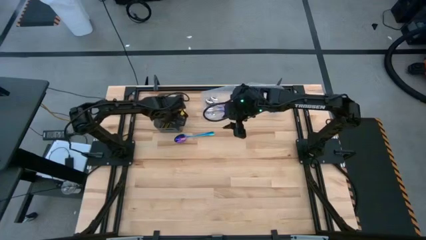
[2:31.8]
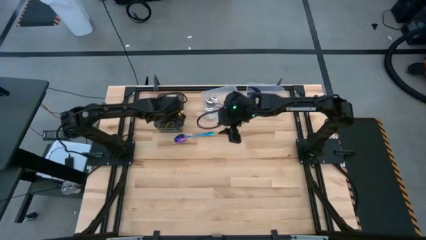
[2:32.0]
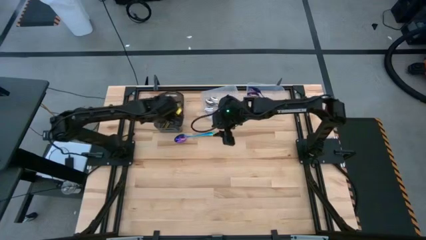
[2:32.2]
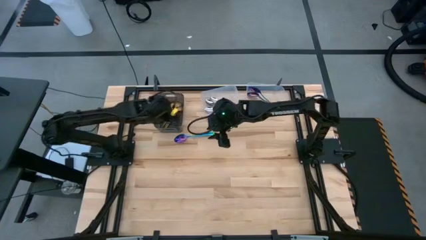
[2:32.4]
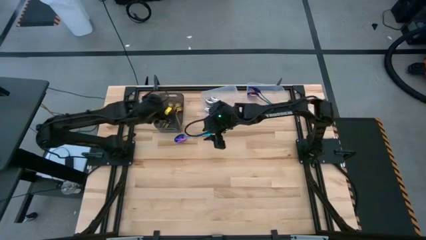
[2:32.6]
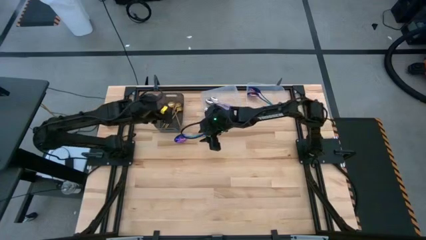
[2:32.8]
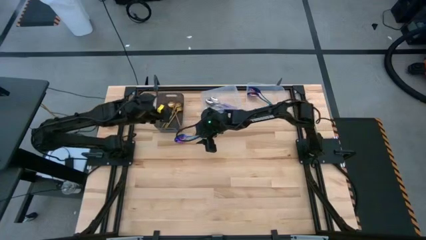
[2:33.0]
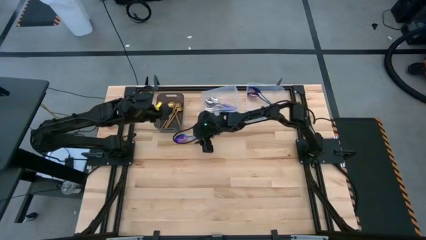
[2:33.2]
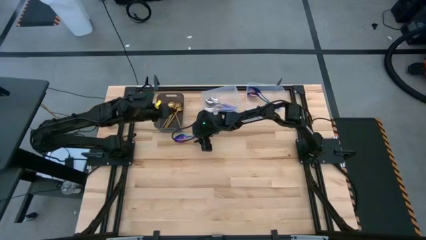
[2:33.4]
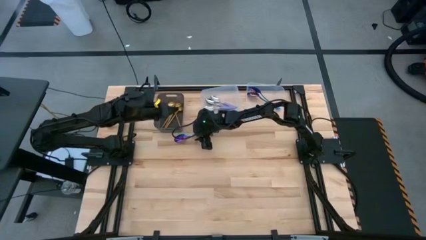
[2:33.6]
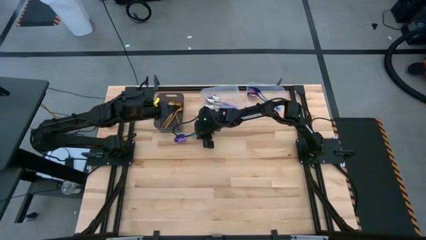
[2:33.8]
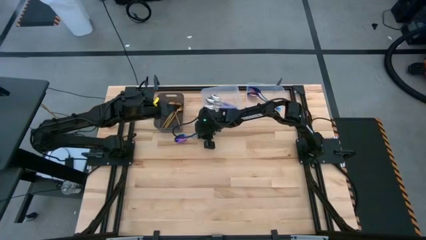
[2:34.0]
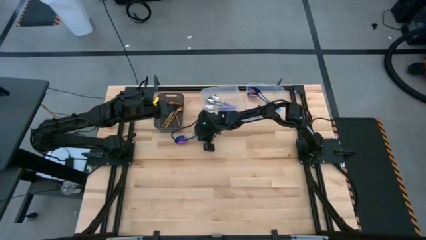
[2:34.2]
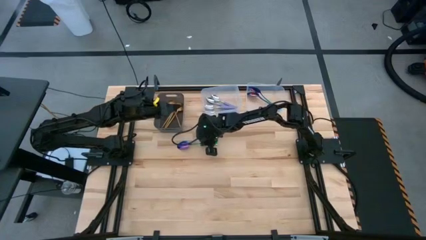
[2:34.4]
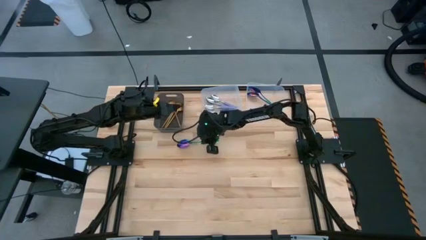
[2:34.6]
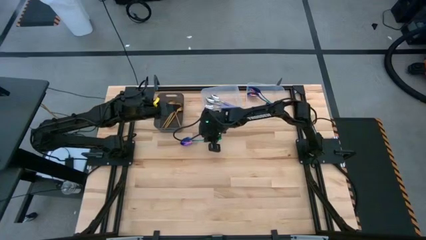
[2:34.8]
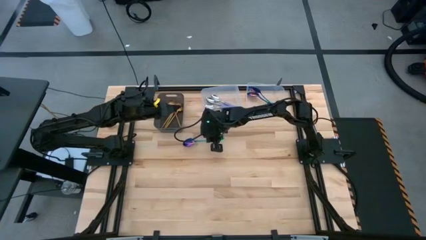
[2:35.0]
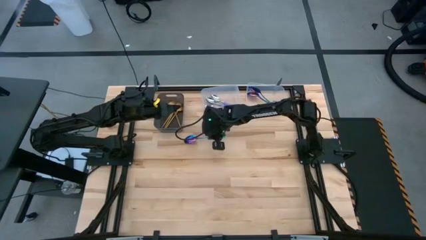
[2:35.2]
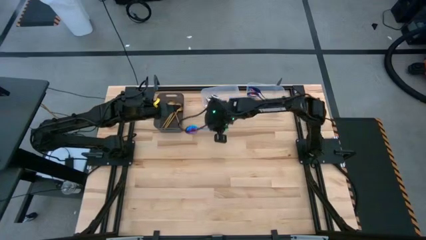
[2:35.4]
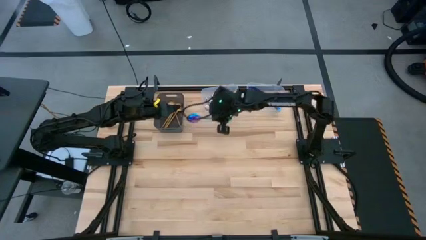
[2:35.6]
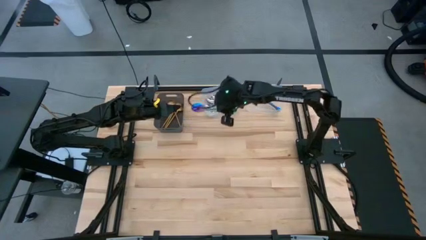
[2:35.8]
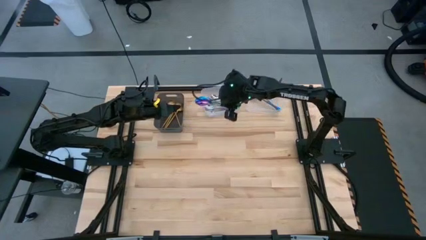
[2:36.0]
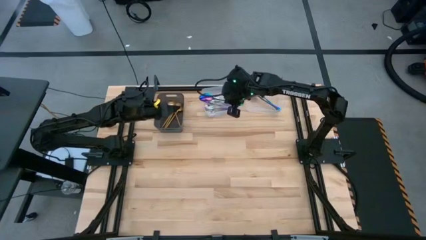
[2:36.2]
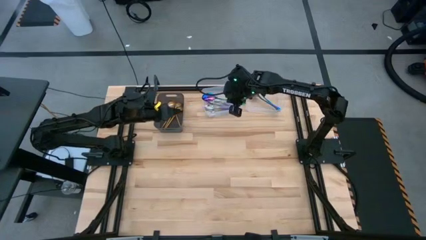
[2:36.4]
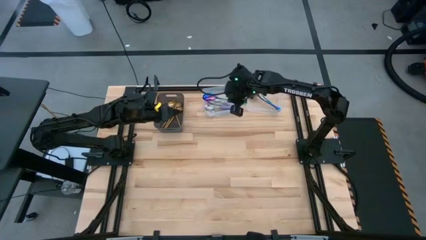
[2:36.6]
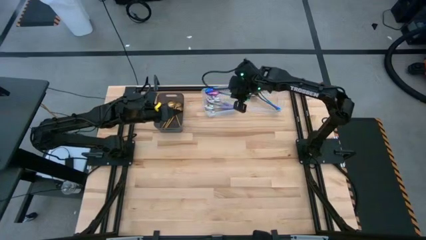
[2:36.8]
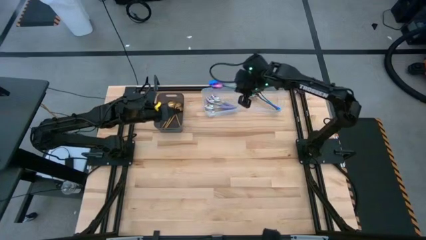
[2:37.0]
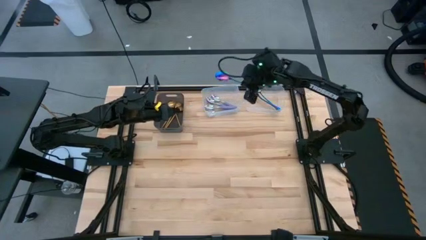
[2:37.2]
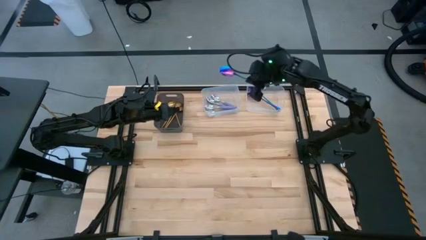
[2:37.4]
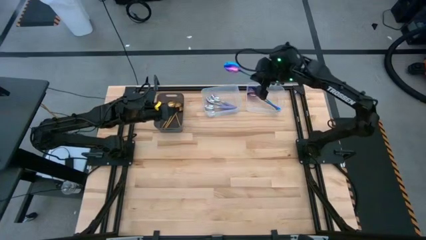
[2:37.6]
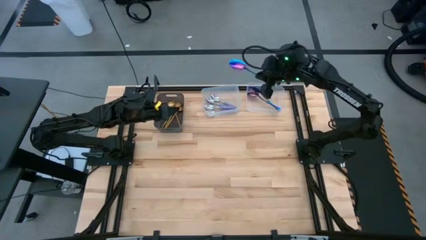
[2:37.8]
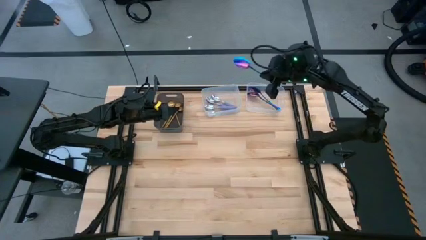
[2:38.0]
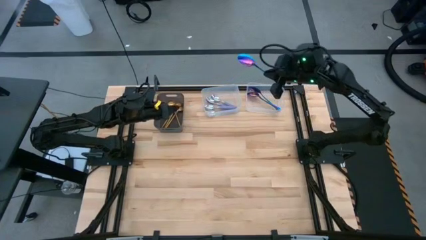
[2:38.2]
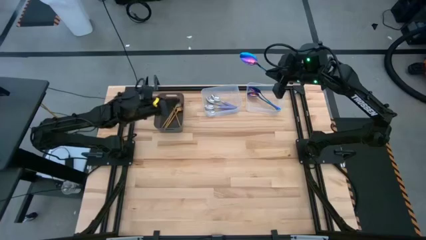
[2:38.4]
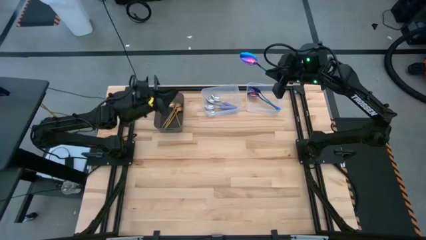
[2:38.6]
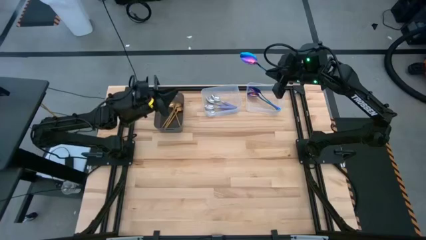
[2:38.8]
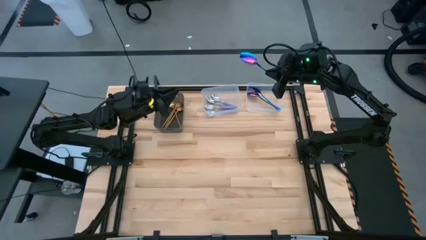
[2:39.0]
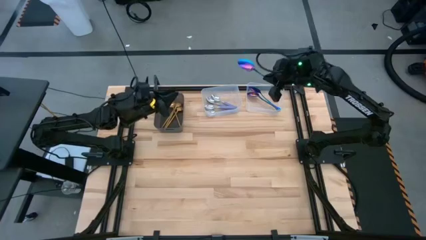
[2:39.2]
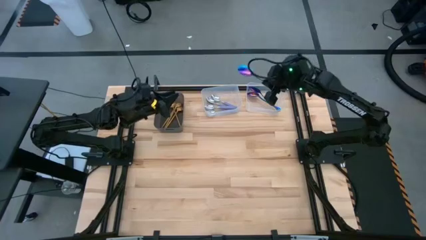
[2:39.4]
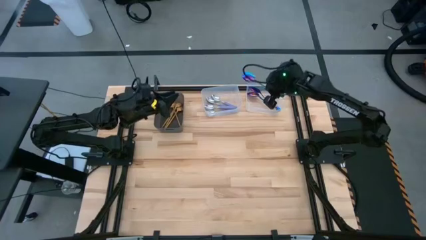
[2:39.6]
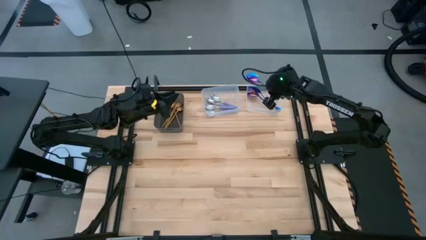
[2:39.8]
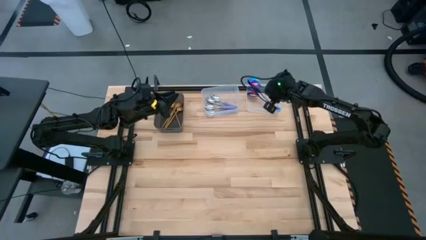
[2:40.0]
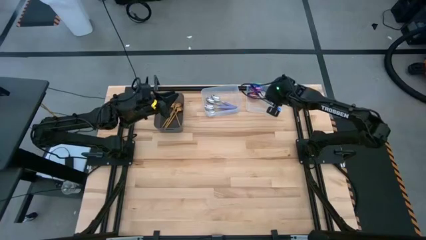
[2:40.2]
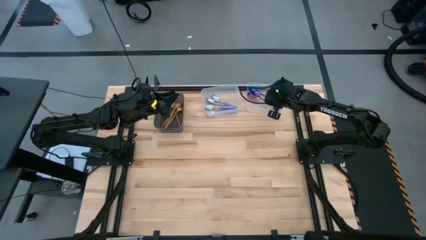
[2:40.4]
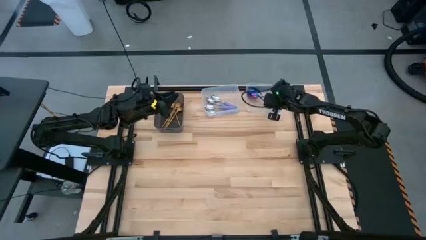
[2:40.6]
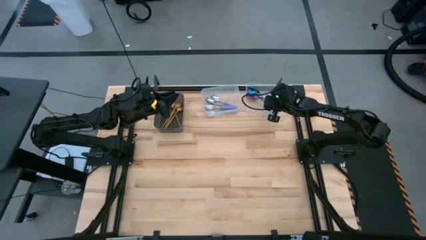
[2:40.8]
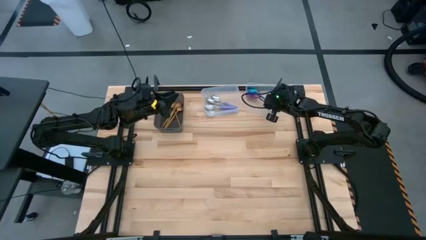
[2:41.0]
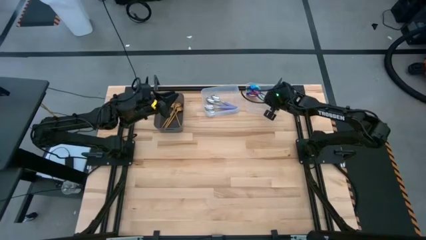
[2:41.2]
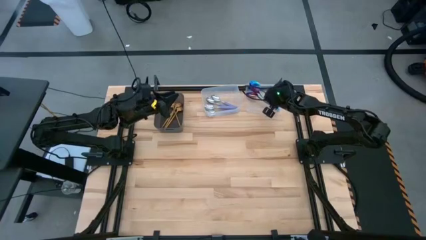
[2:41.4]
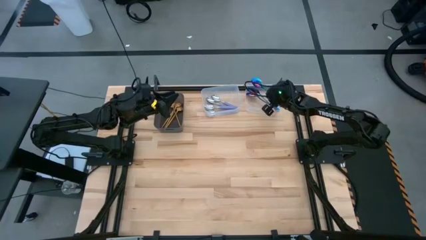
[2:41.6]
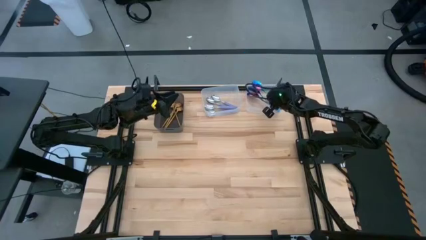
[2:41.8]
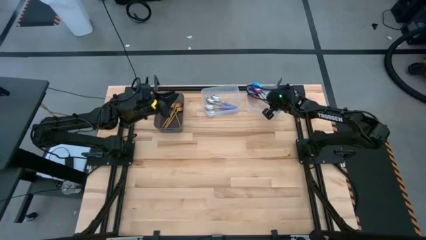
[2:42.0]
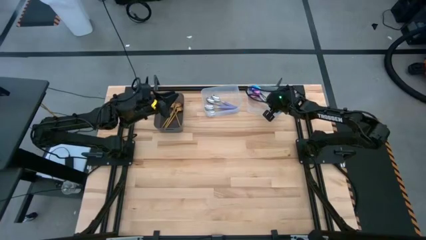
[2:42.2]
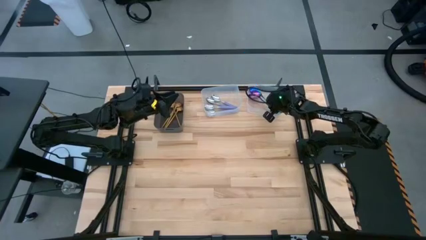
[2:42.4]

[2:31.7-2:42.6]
Task: Sort silverware by color (type)
Put the blue spoon into the right transparent bin

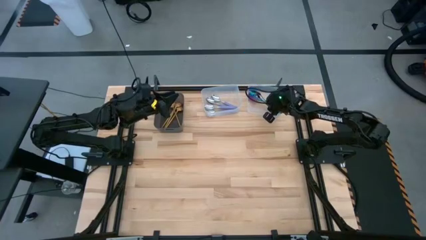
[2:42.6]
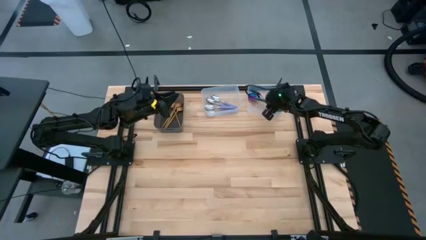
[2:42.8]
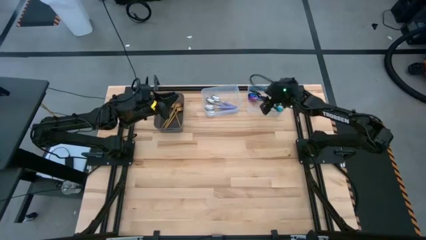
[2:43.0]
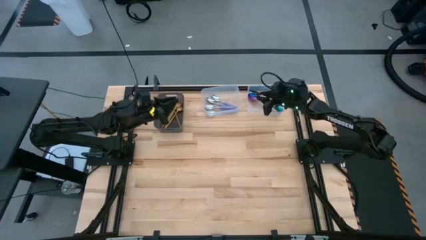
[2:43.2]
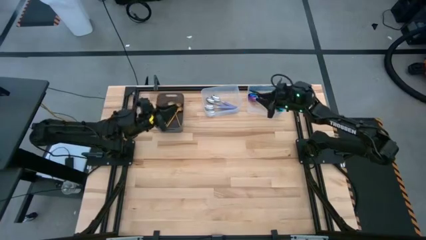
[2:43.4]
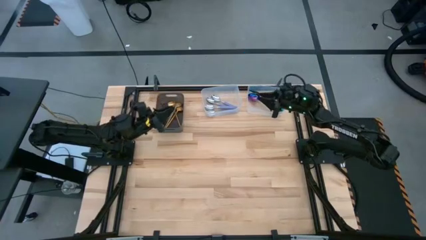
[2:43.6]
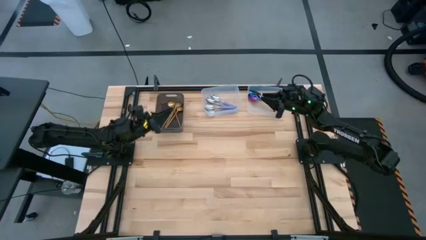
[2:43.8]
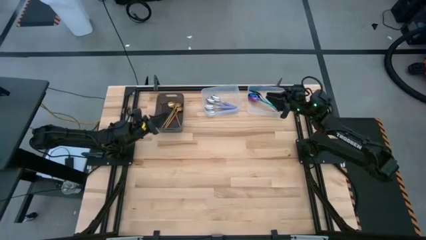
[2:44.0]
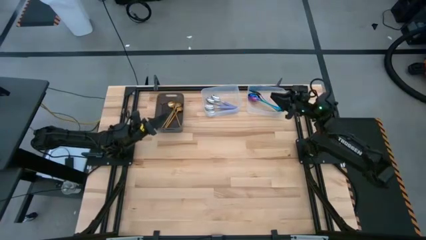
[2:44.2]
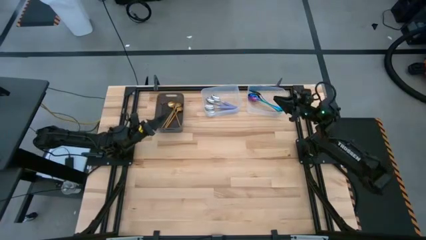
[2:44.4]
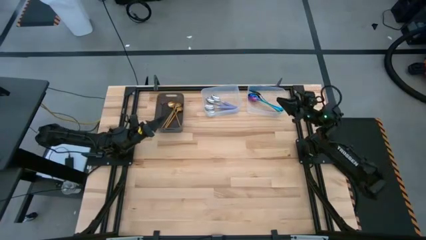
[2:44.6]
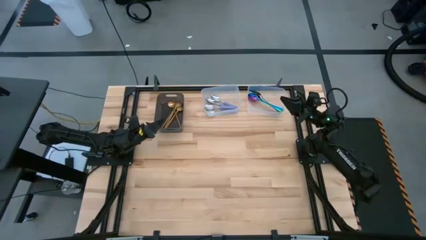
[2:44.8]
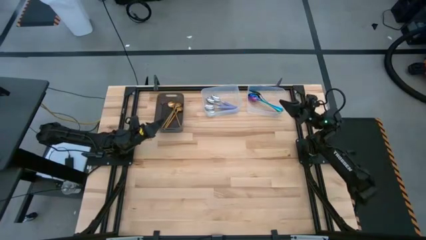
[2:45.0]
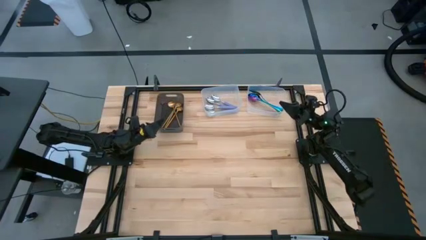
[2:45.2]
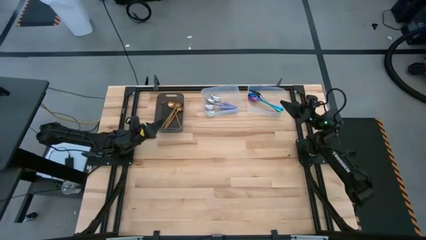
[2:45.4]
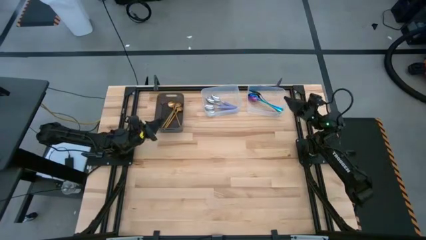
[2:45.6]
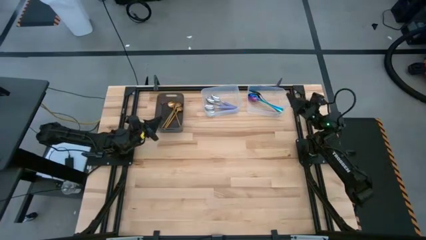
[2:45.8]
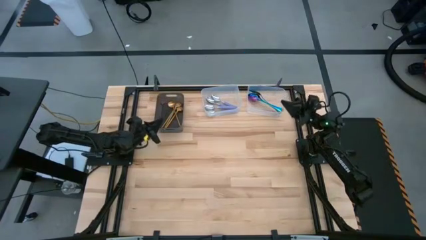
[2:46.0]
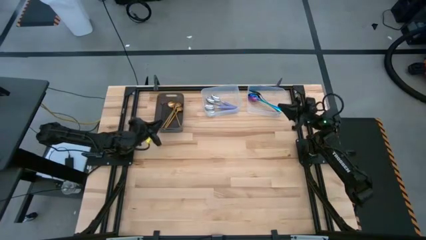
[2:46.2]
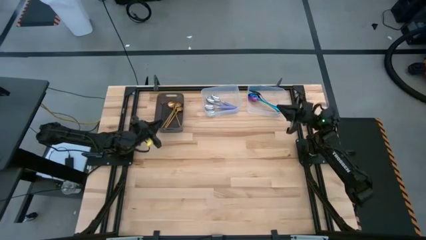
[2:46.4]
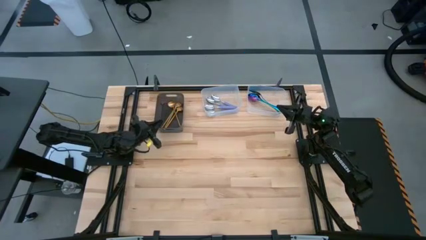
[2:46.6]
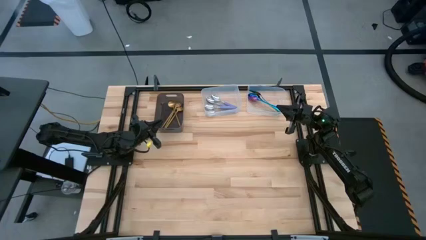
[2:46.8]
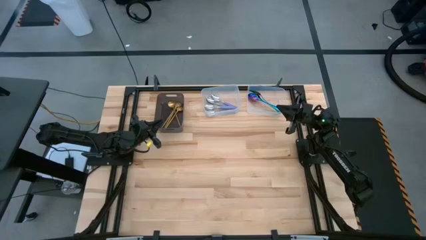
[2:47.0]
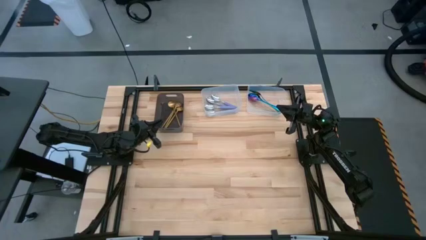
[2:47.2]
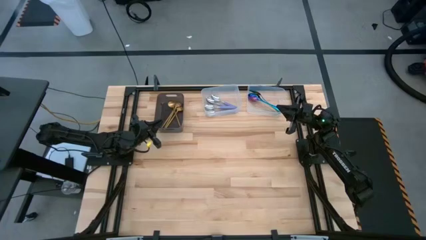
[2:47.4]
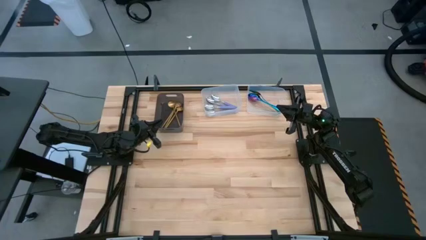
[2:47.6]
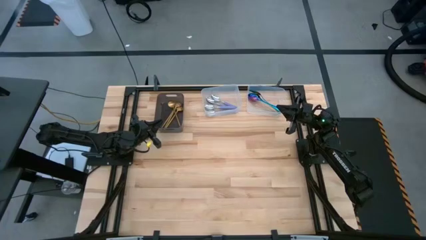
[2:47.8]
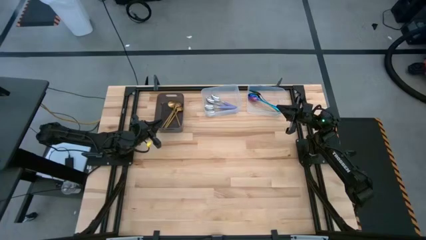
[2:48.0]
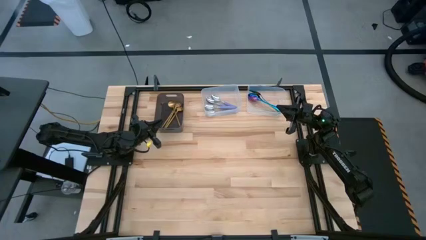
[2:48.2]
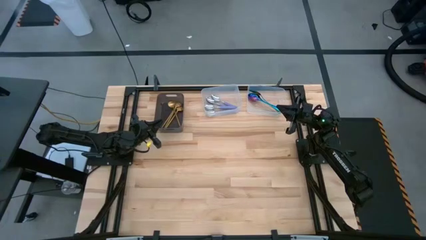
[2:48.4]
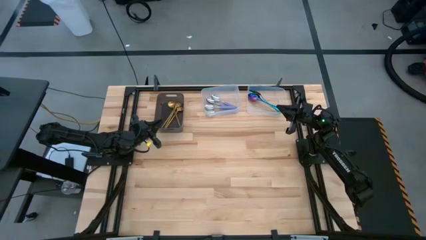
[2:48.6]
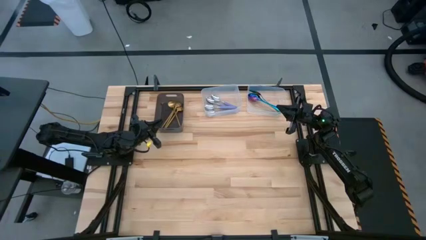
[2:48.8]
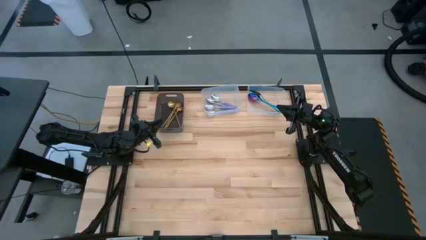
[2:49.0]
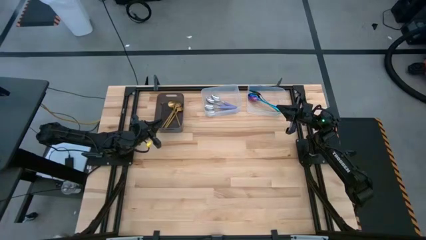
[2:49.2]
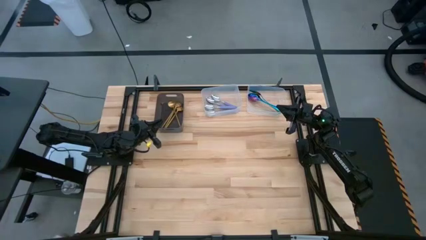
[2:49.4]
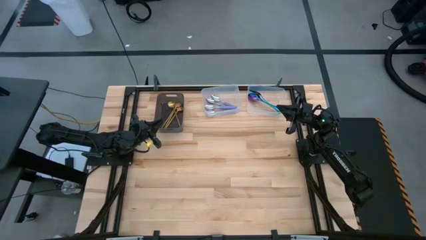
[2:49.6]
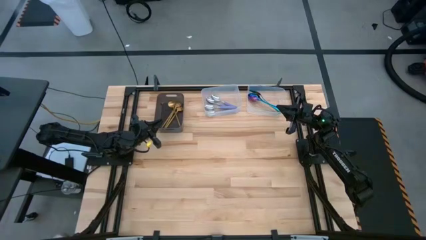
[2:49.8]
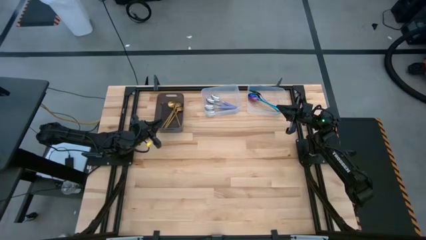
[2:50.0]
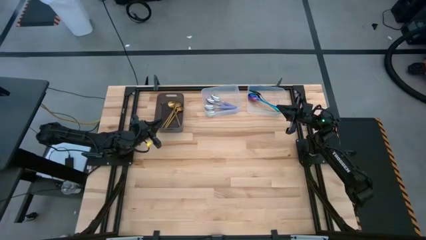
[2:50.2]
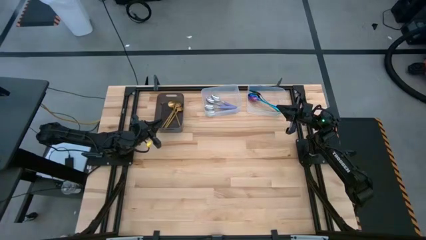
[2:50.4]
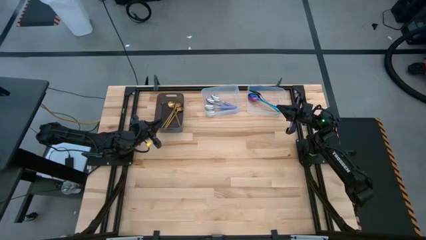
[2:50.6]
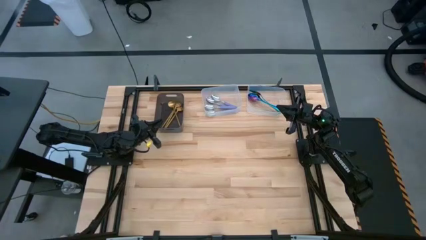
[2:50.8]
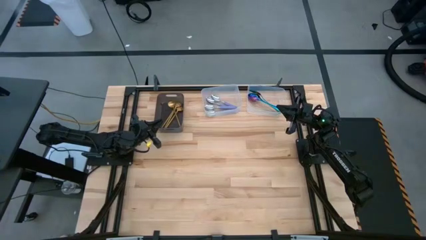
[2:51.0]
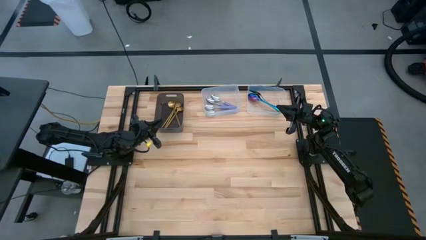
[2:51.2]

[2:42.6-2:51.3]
Return to Home Position
